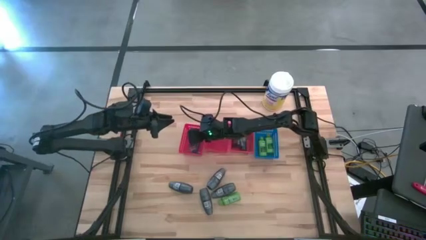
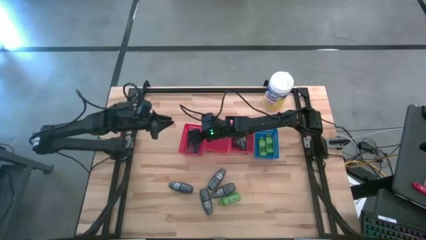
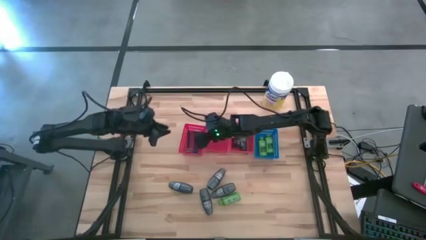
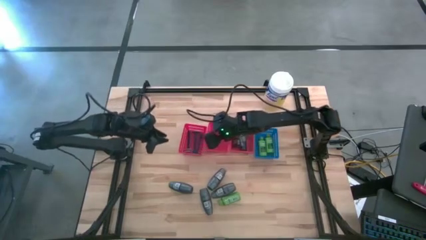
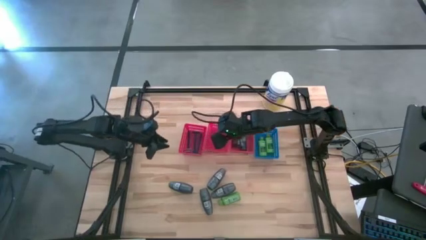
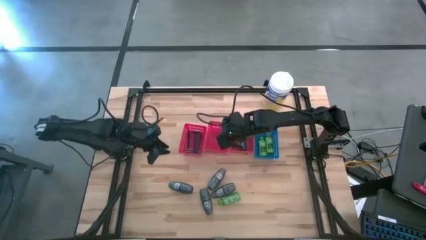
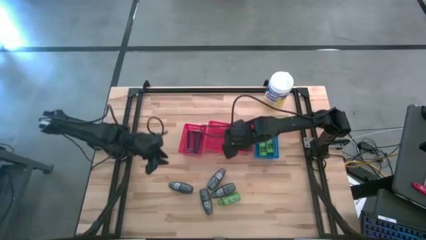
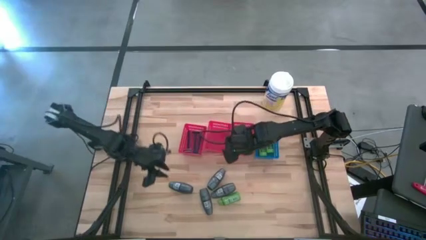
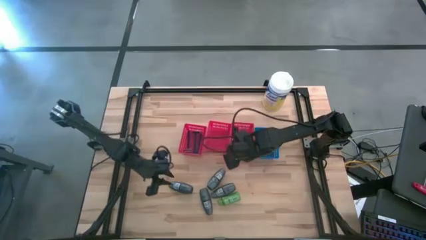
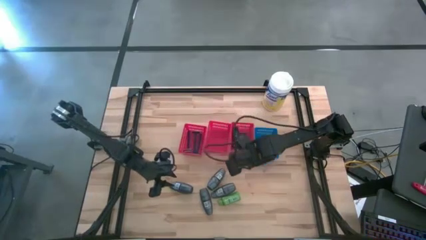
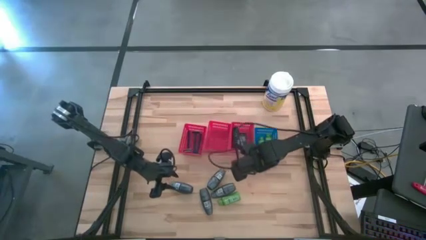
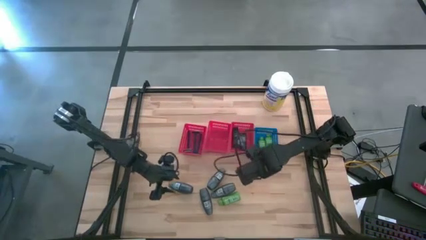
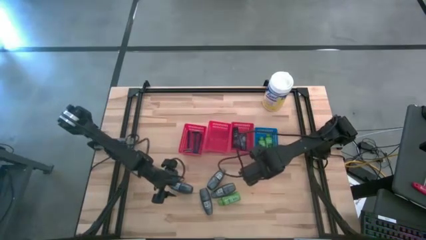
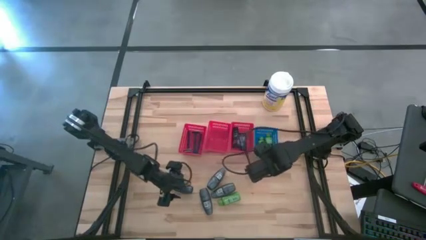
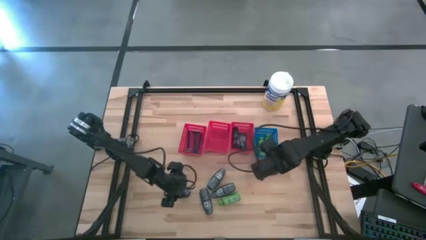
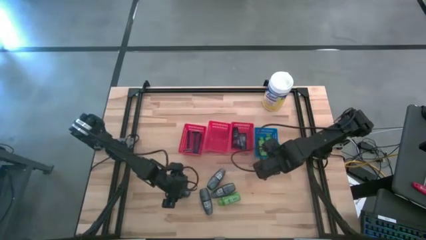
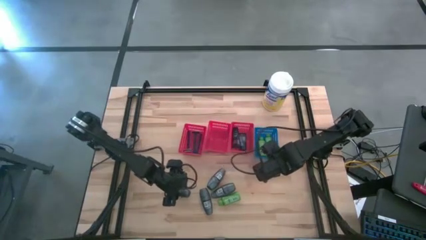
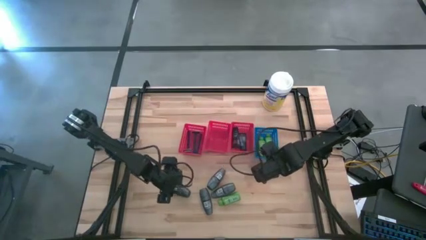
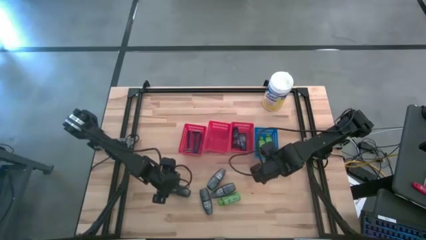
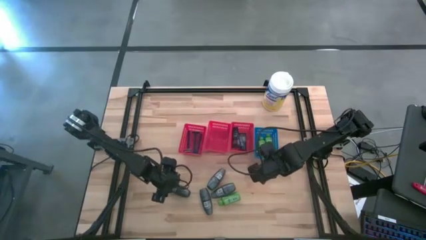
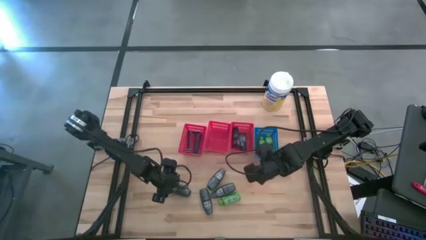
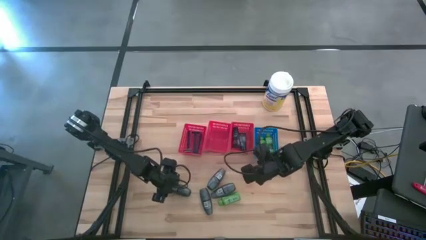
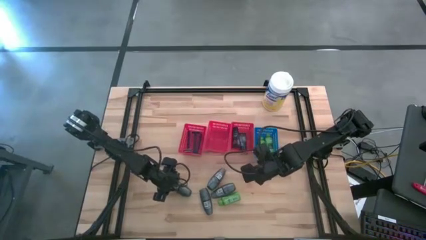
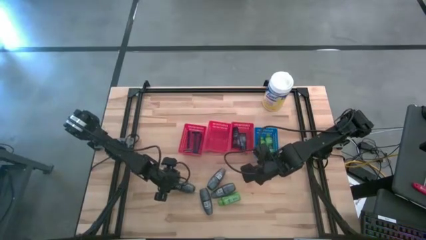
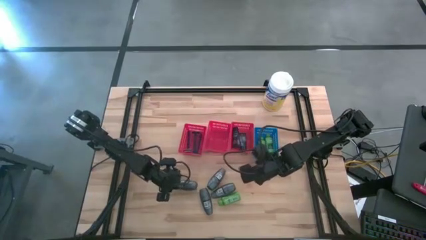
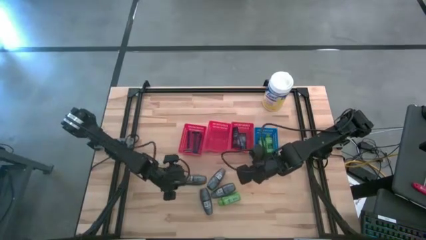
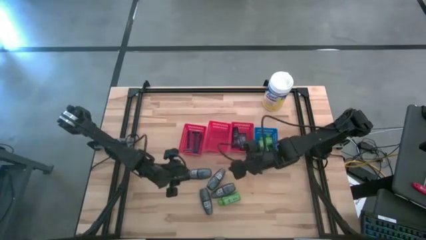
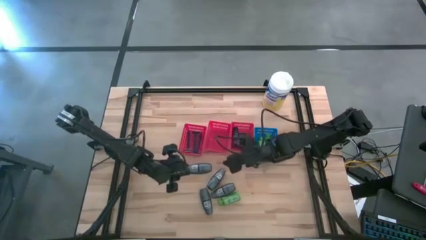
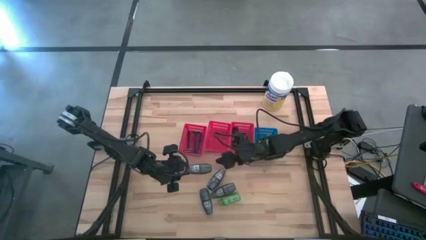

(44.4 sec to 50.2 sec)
Task: Pick & Place Travel size toiletries
Put the deodorant into the middle red bin

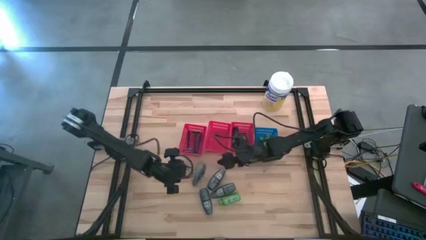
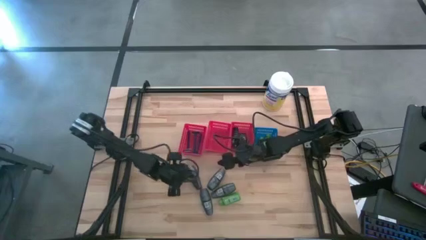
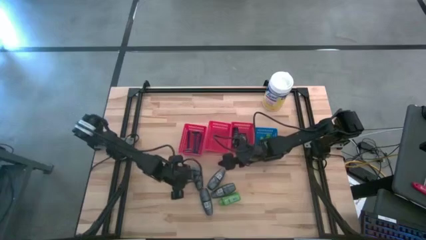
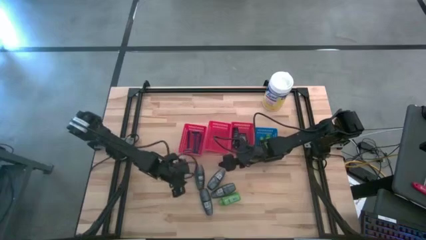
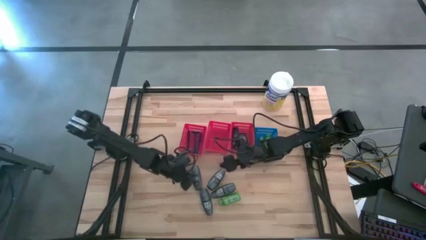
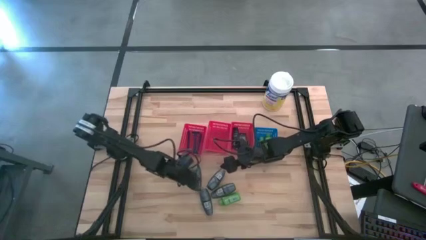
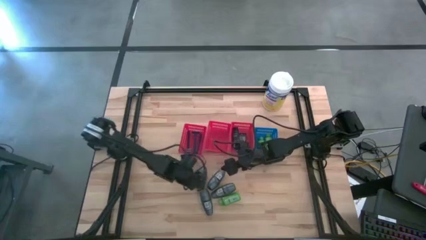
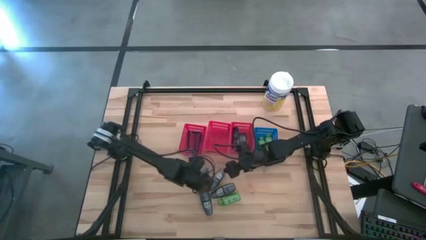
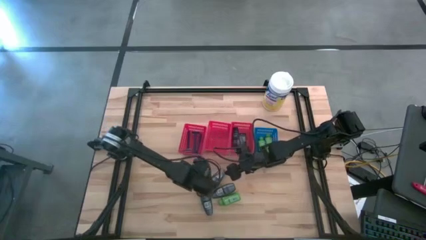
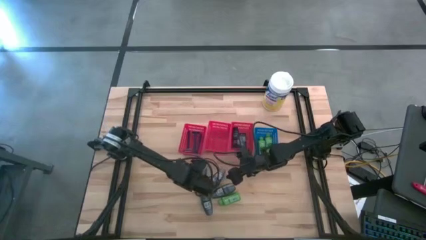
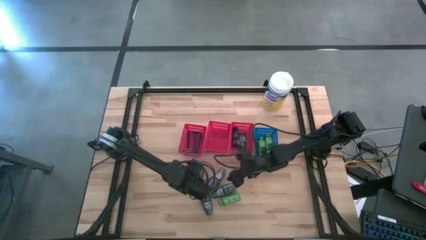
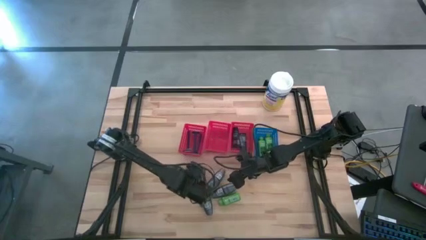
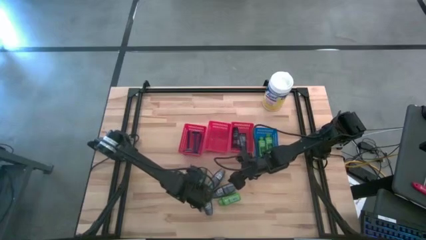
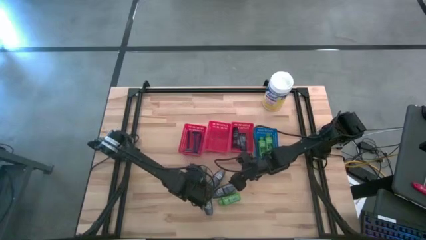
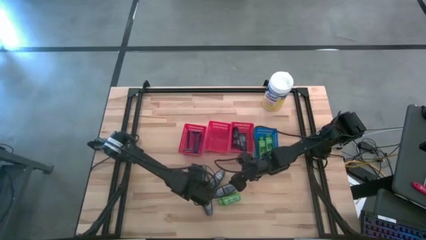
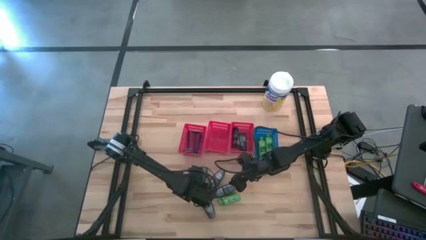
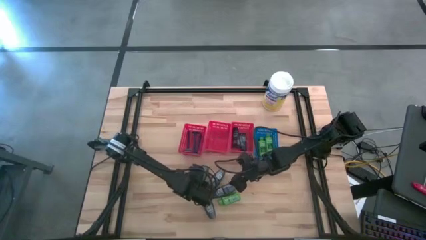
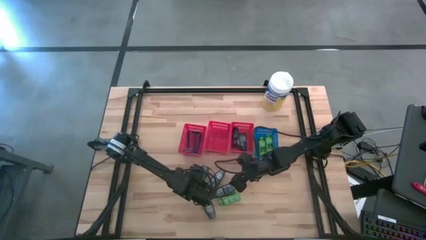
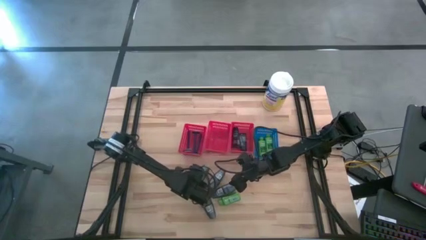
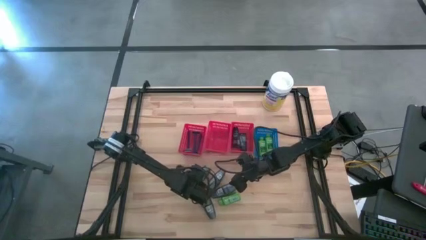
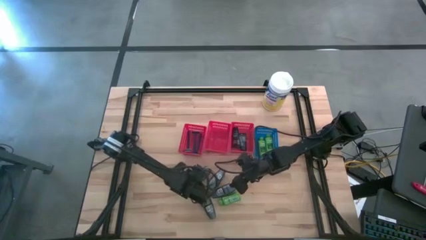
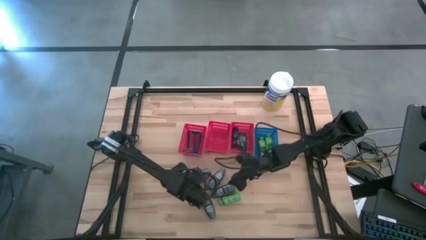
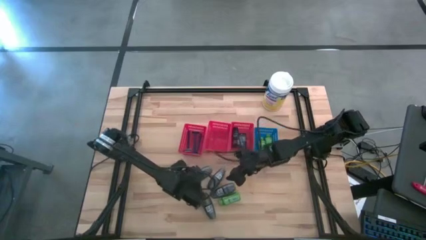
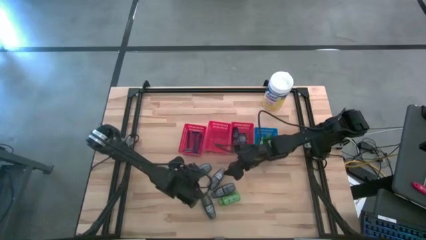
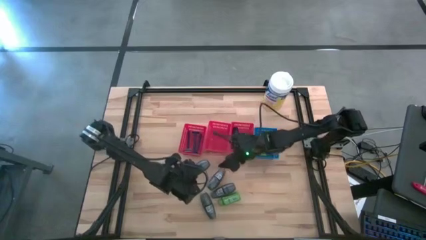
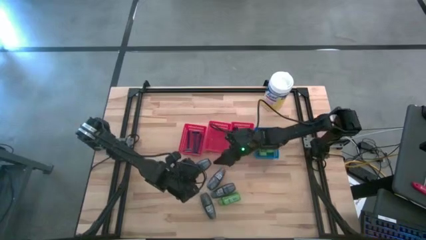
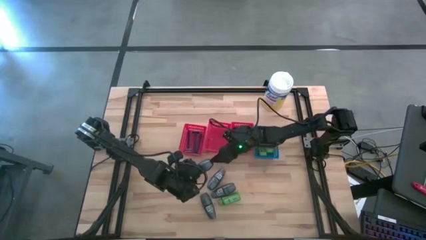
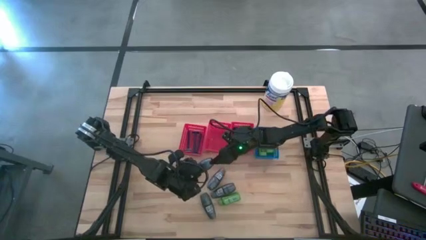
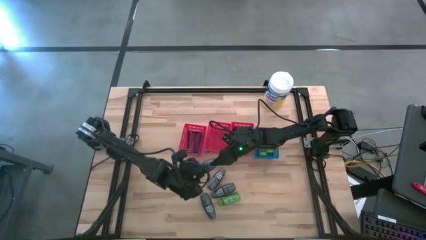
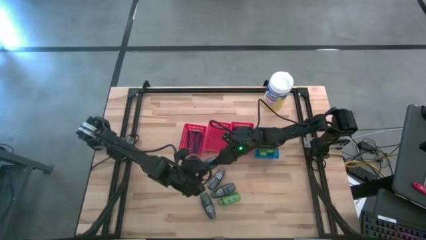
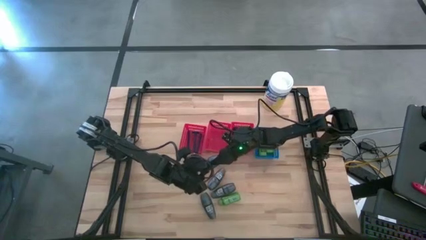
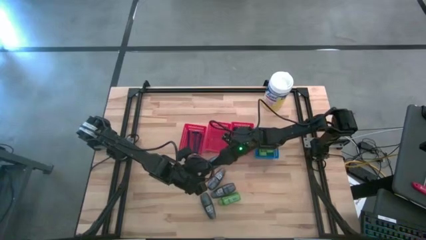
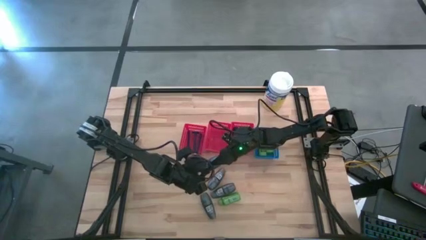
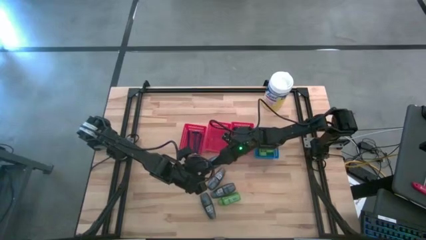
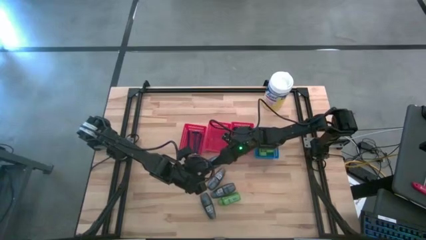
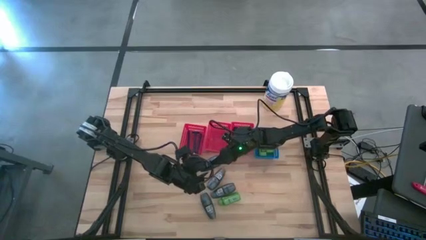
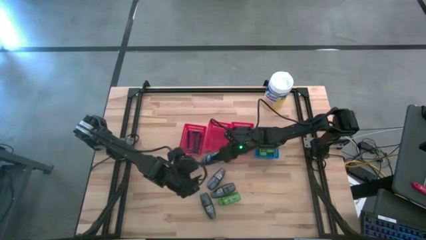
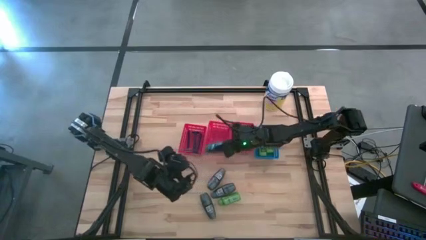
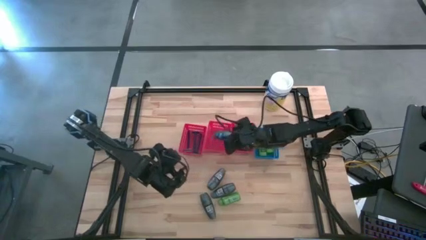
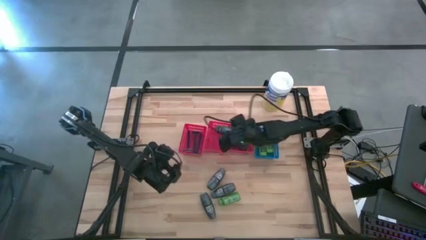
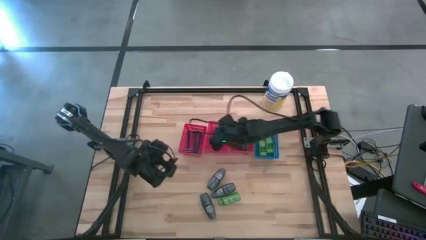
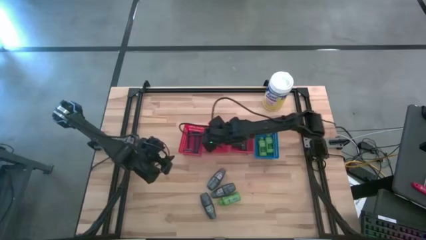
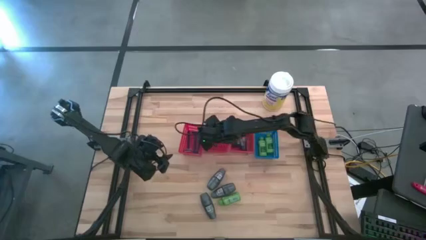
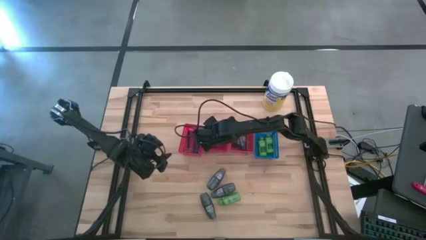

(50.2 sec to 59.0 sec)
Put the deodorant into the middle red bin
